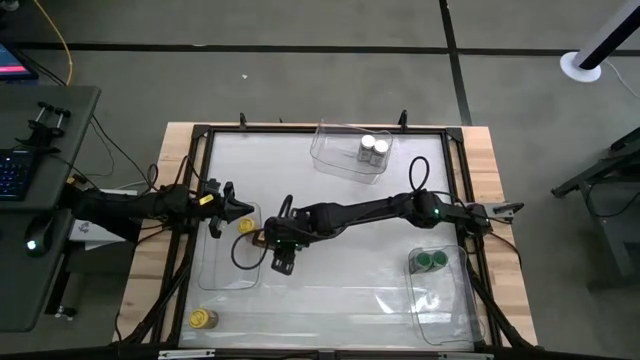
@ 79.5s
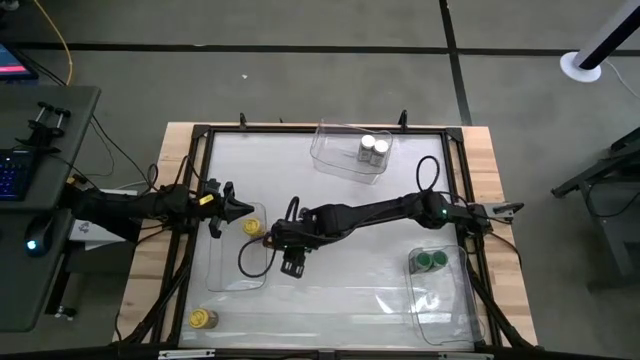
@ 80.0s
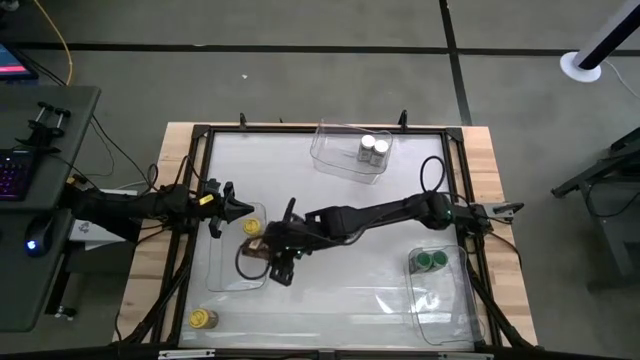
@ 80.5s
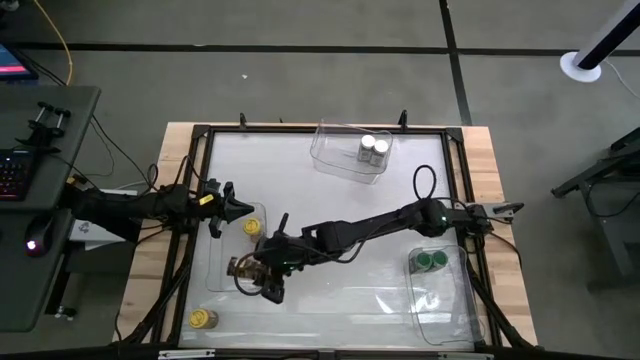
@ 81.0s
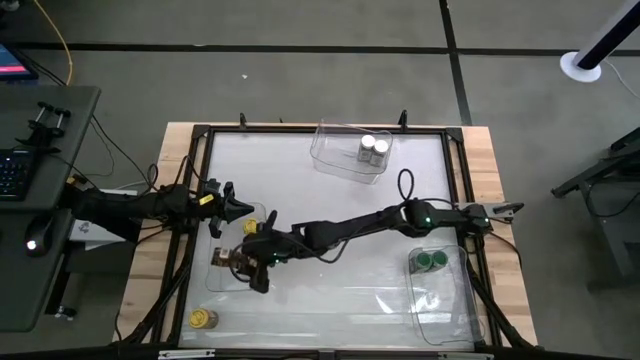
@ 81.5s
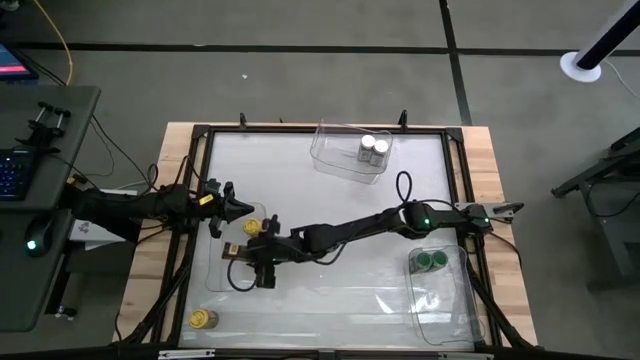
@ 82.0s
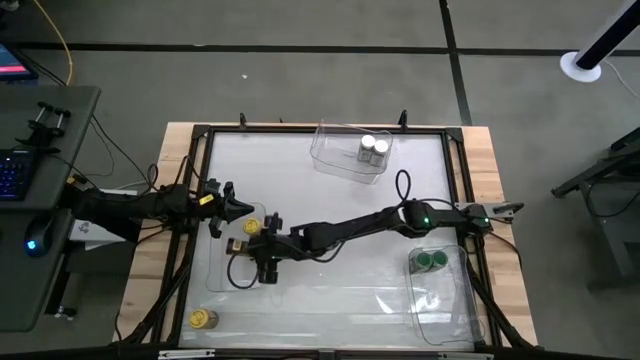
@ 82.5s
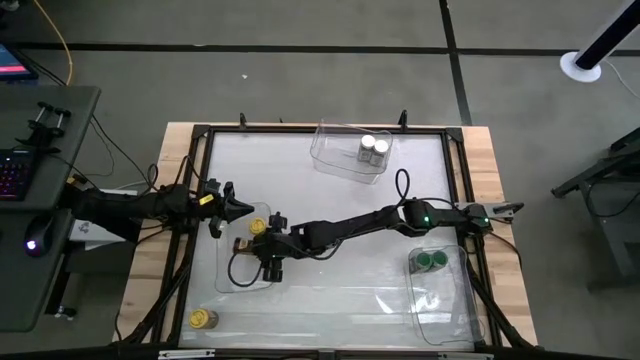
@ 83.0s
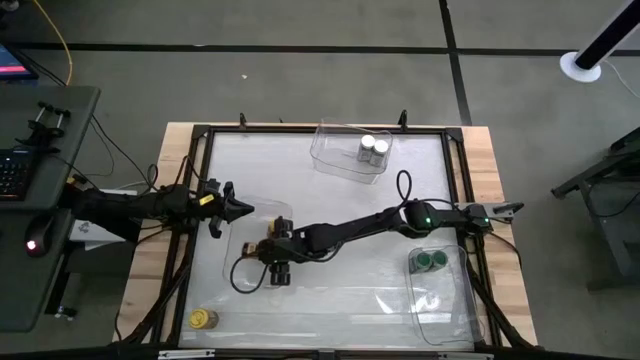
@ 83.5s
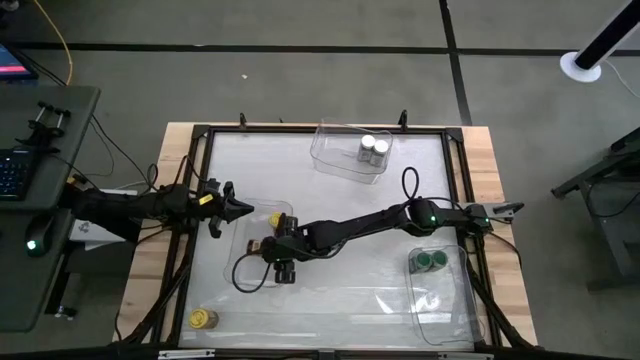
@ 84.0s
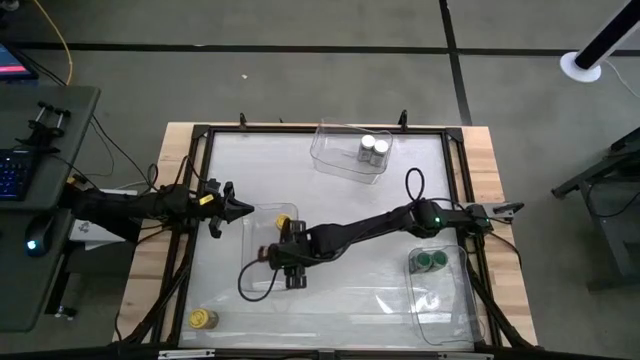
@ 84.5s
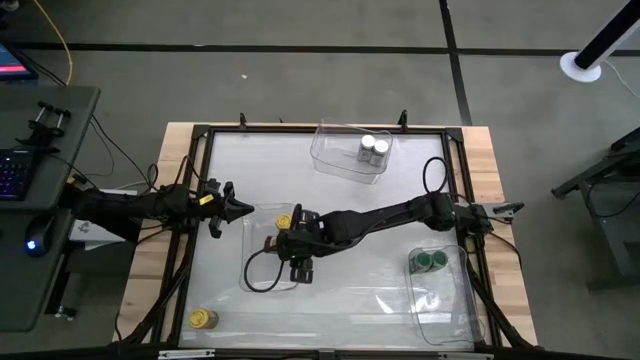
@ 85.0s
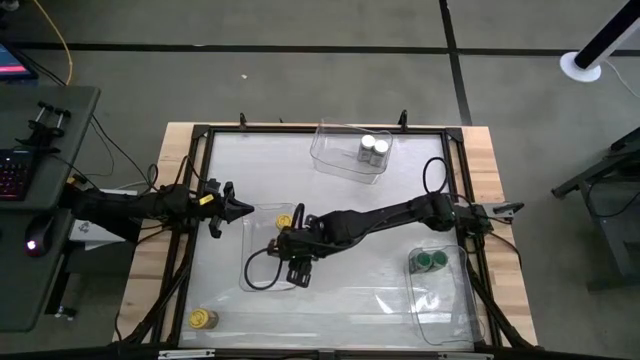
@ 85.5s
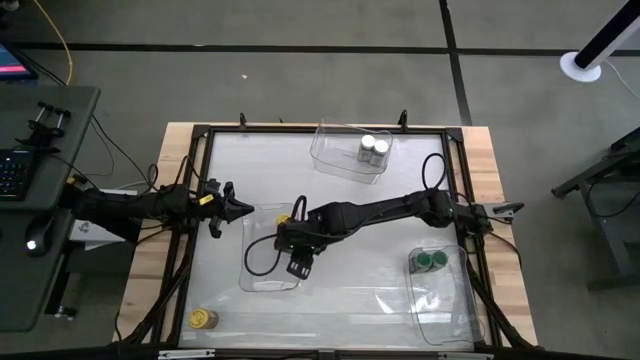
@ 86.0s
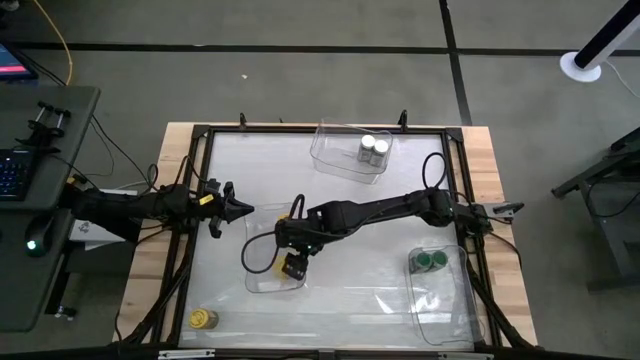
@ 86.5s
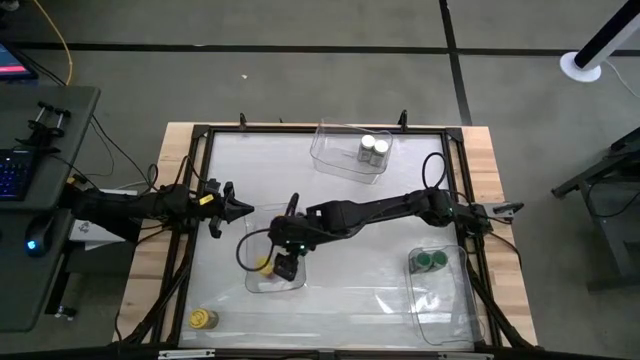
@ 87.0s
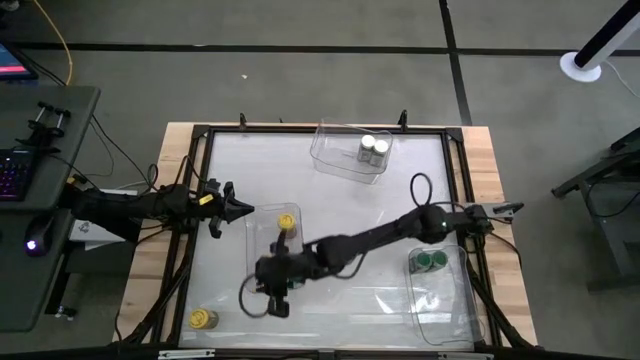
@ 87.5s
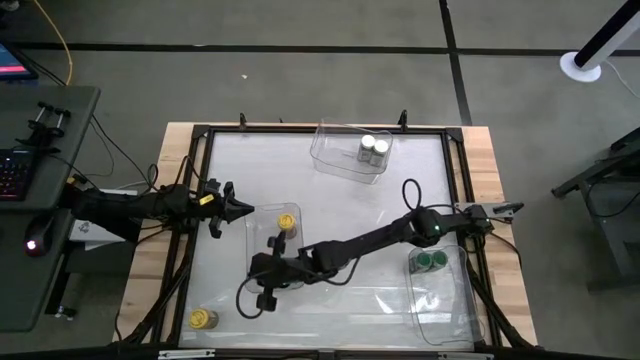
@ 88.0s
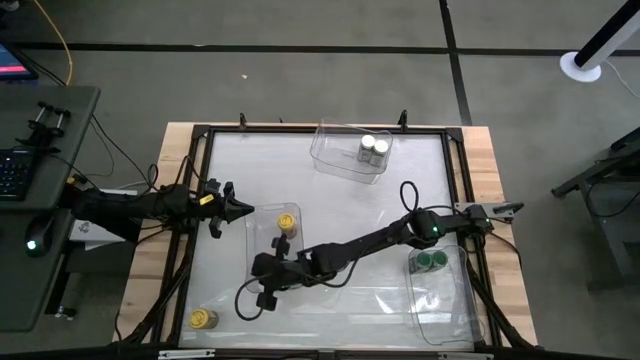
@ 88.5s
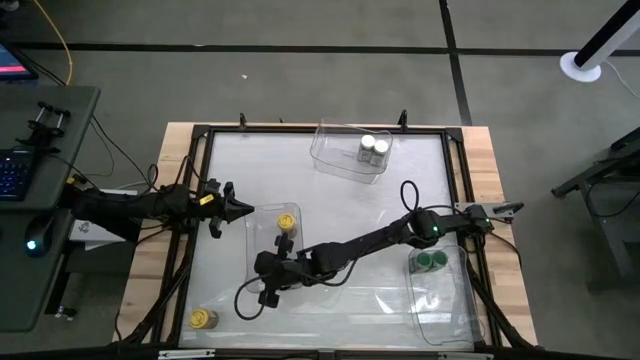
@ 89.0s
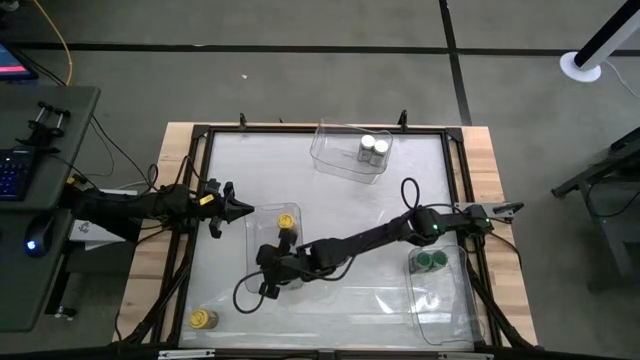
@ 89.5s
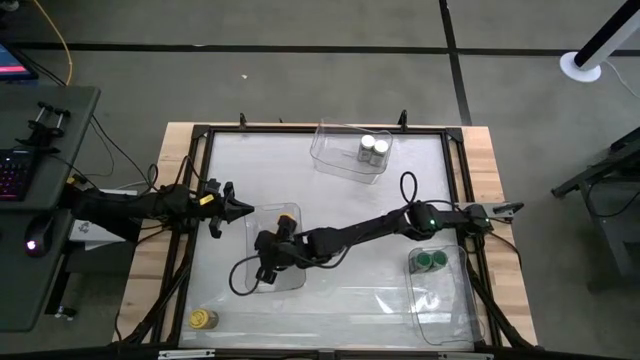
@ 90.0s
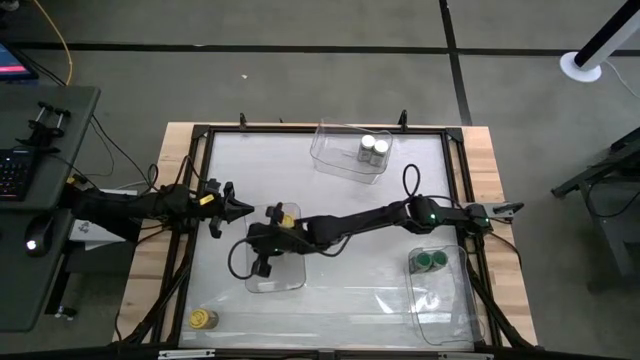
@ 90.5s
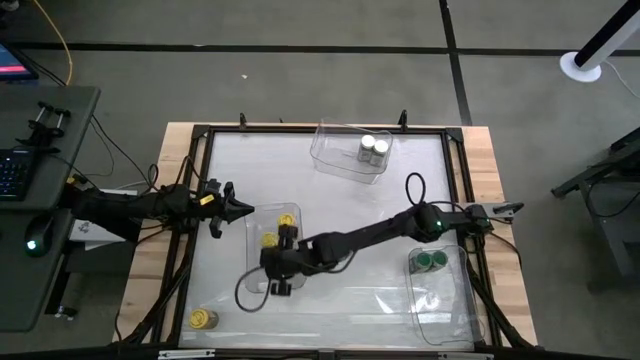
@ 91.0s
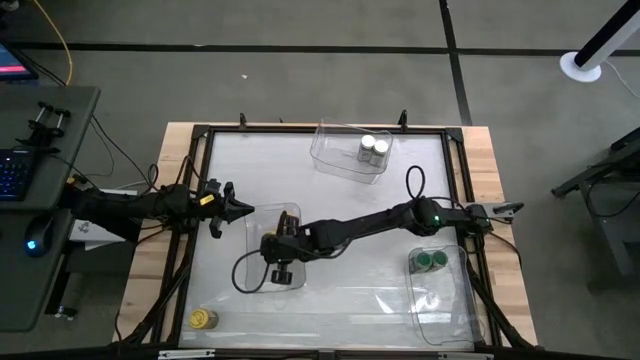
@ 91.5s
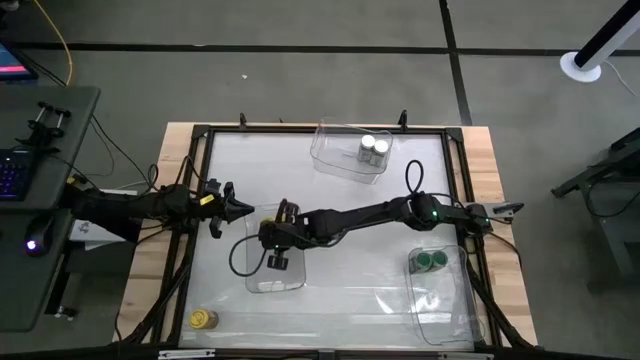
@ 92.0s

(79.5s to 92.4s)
Task: Sort spices by type
Put the top yellow seasoning bottle into the left transparent bin
